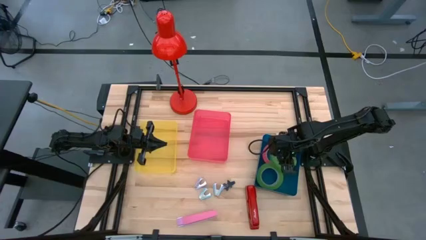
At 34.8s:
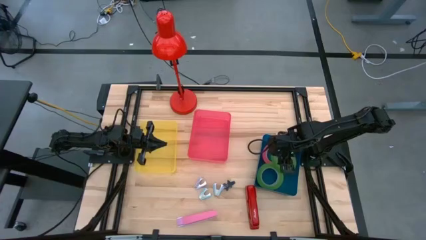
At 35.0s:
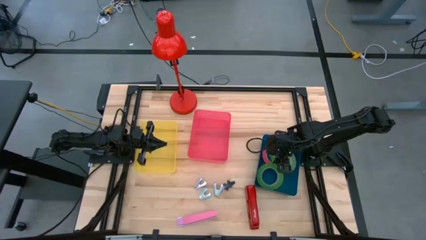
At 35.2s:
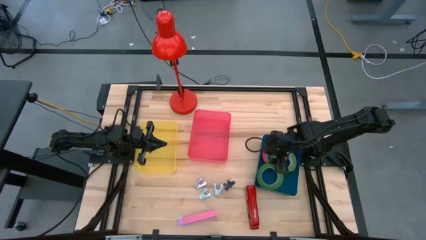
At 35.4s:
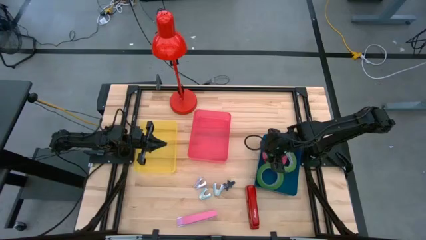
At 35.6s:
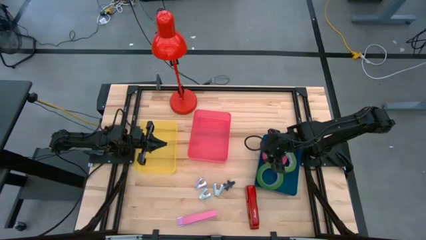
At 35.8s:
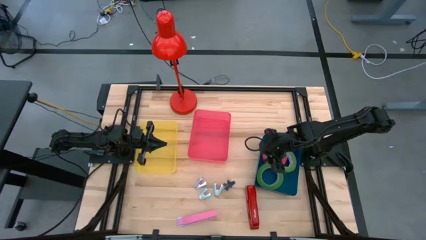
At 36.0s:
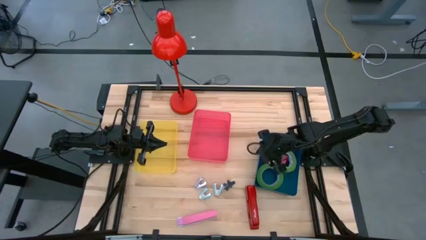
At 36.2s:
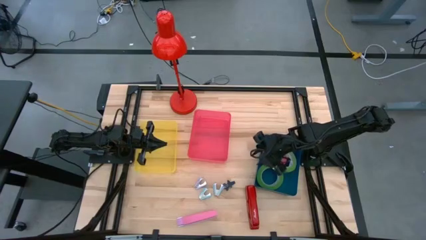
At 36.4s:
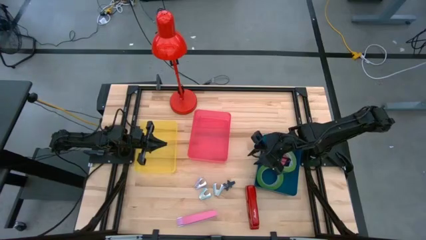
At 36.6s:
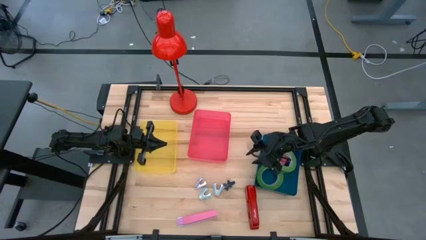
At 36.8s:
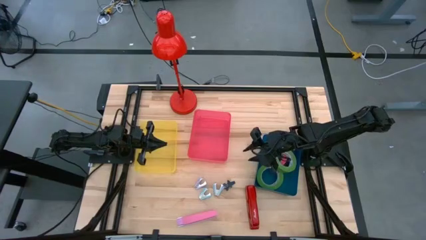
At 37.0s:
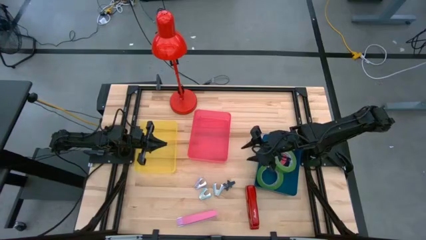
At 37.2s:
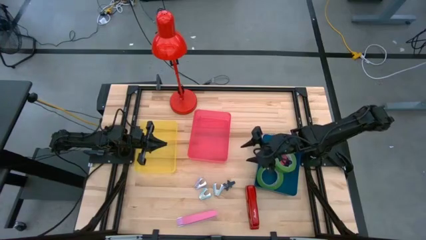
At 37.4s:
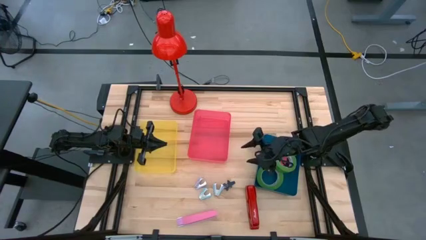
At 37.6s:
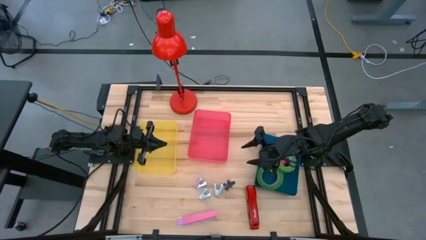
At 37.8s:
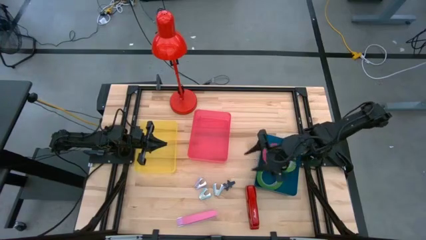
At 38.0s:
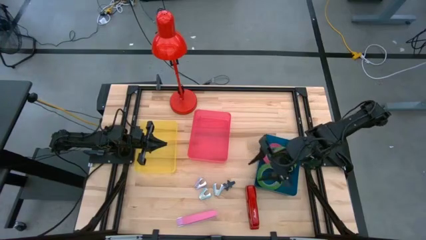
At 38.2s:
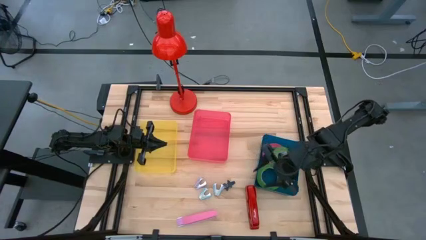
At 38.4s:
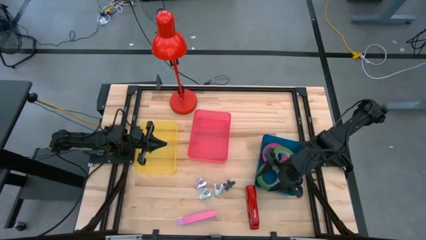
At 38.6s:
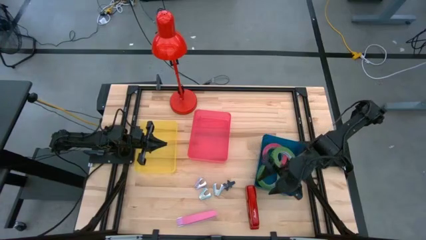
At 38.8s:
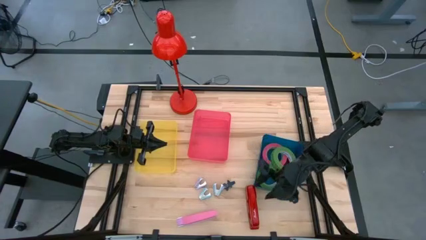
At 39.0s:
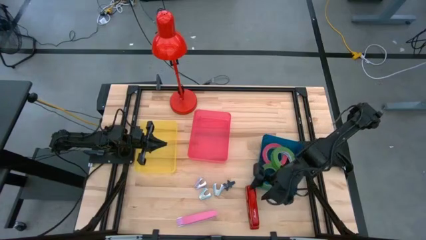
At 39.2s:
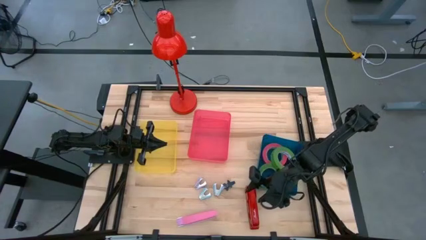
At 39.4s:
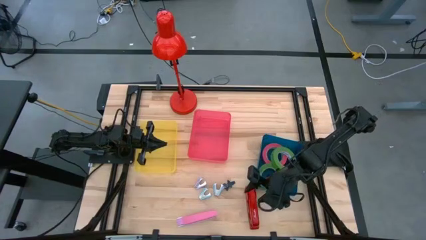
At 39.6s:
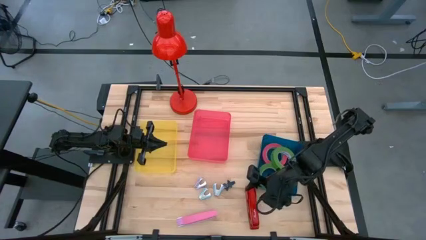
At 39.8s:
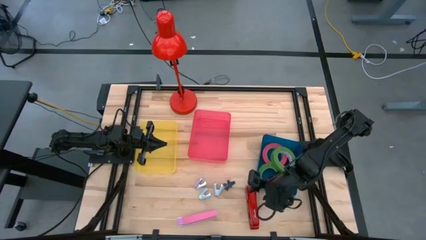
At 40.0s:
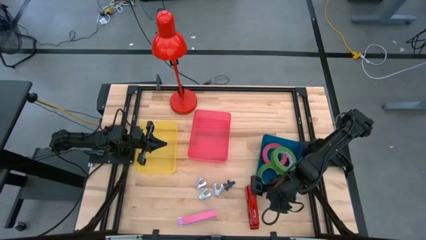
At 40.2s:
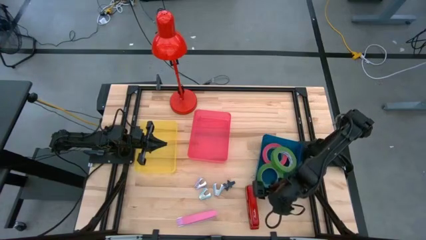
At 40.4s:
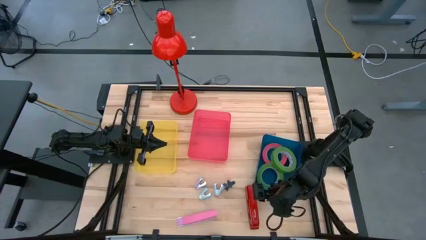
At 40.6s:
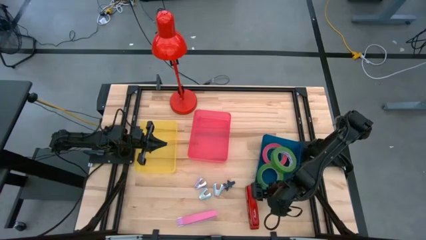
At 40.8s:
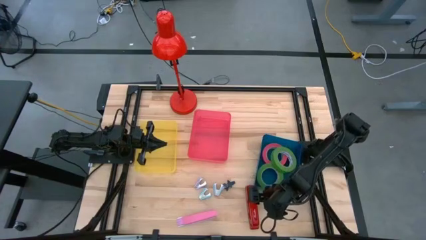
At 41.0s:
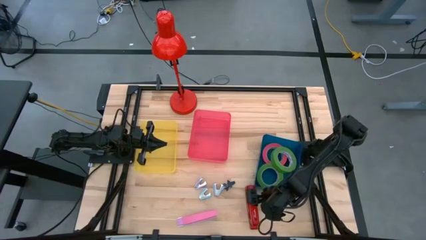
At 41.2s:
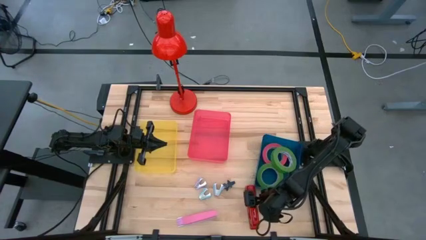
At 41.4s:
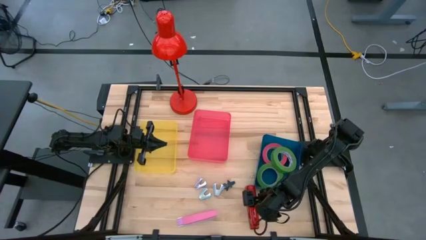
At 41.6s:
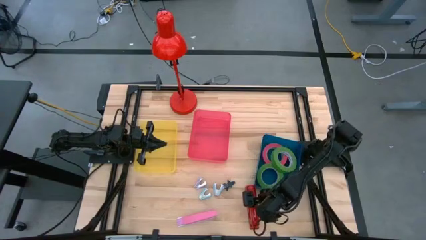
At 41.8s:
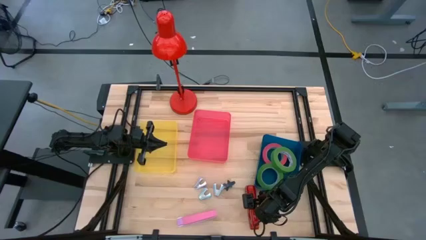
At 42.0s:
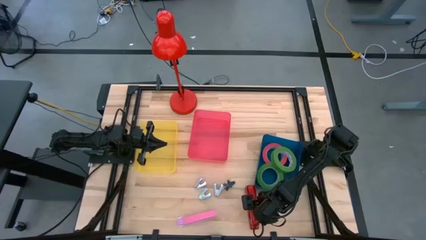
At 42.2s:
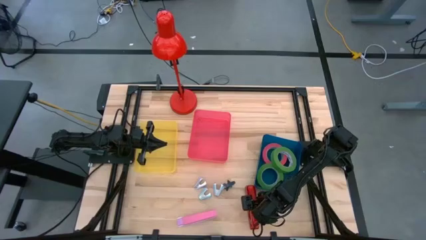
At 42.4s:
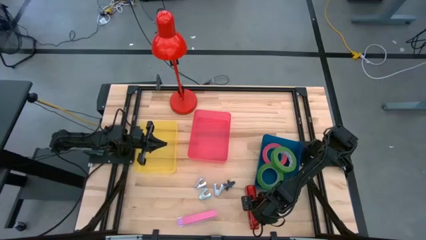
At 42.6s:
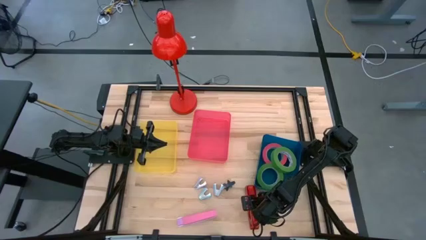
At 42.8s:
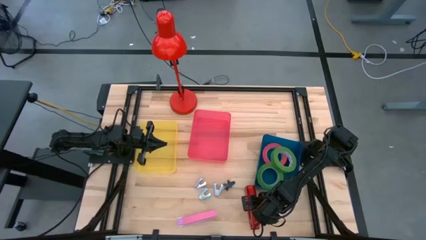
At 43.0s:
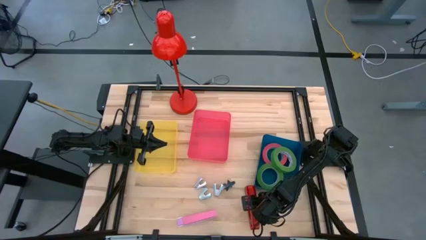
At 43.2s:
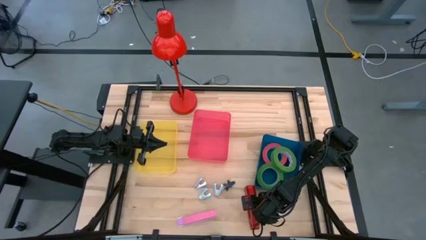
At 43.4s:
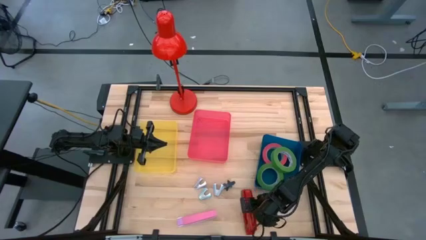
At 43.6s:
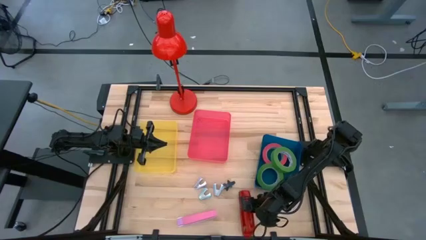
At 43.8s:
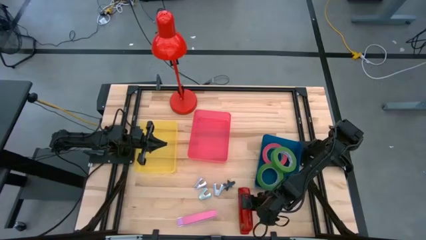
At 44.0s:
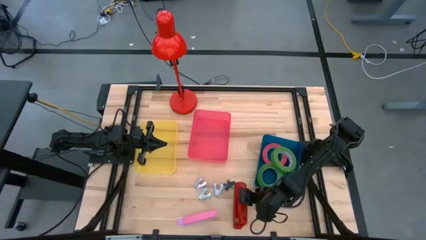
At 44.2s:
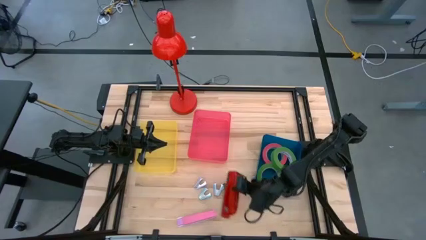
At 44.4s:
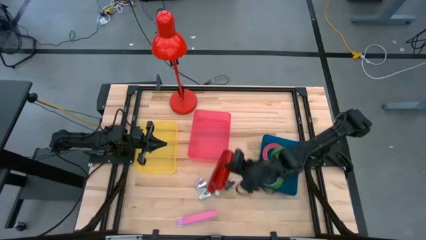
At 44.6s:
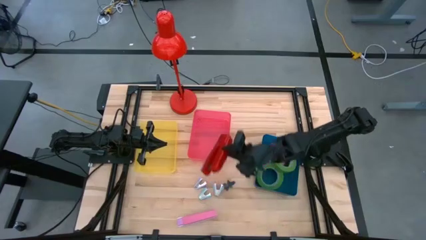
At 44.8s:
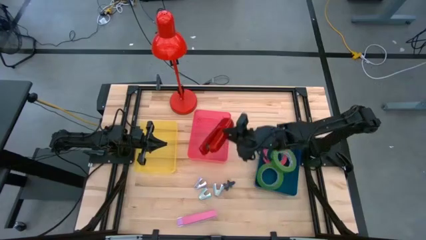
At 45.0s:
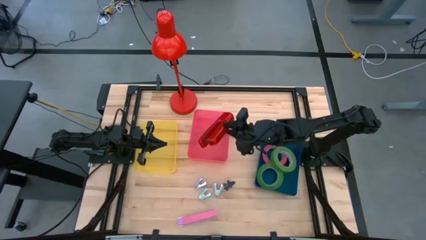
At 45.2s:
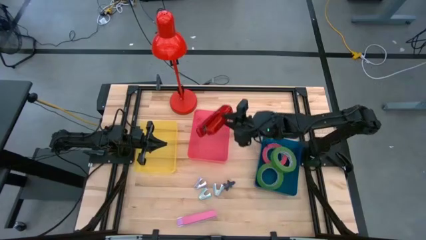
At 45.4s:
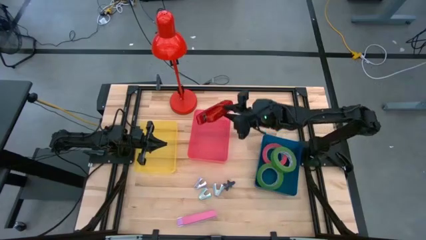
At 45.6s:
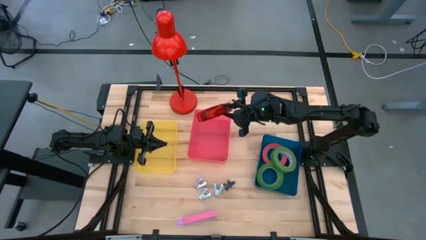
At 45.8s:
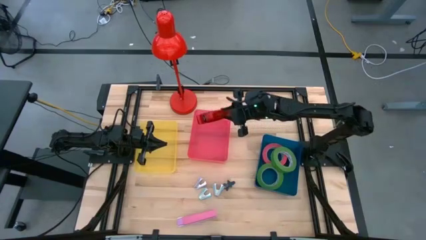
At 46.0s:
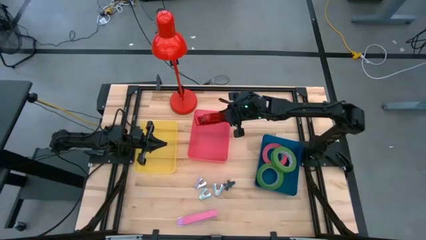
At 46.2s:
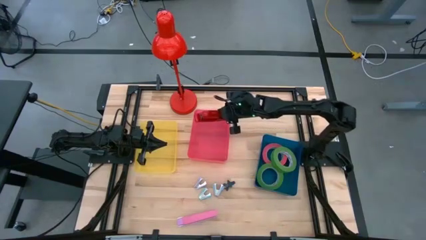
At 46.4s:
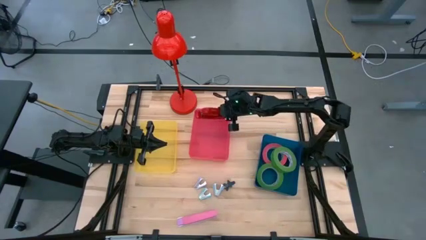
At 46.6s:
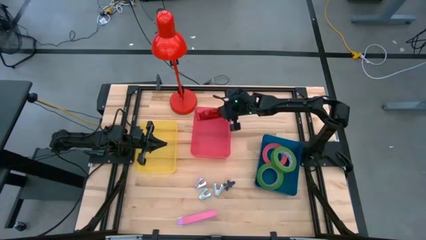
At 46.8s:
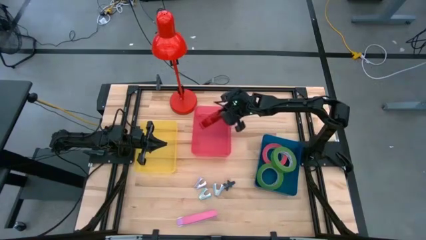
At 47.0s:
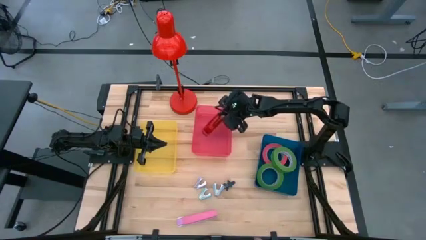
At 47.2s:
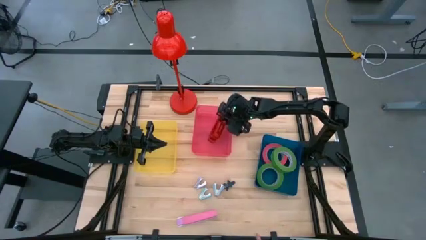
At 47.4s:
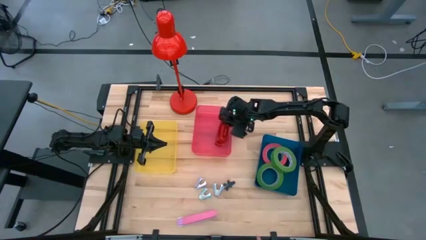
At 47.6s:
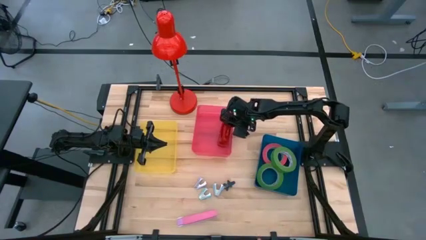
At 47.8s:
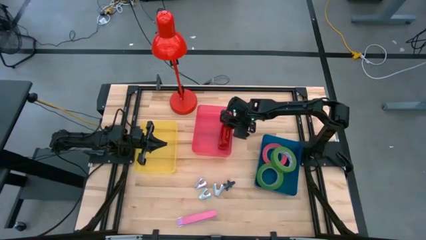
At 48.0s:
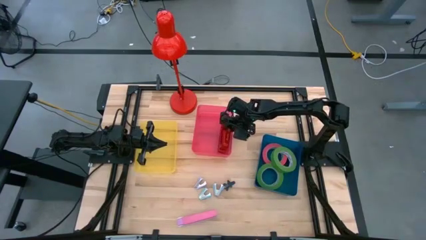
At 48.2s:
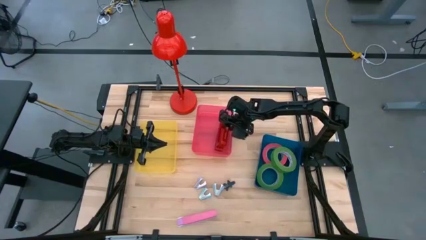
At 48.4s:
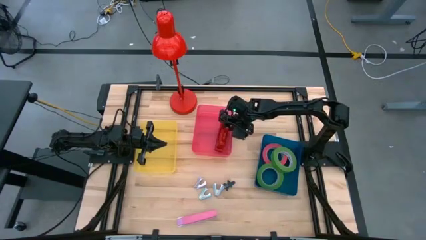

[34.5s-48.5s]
Task: Pick and place Stapler, Stapler remover, tape
Put the red stapler into the red bin

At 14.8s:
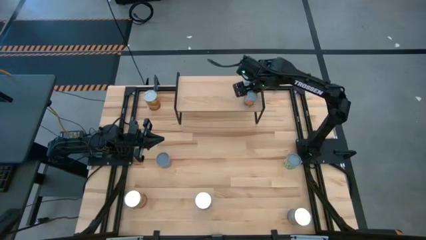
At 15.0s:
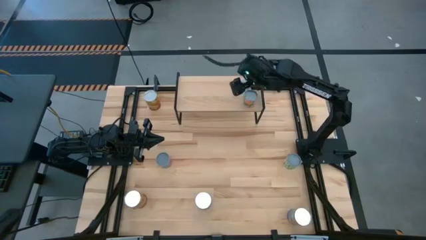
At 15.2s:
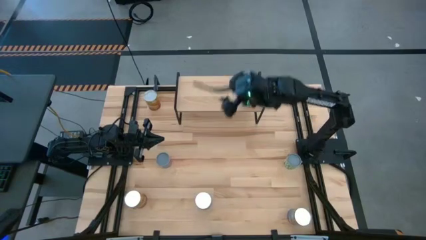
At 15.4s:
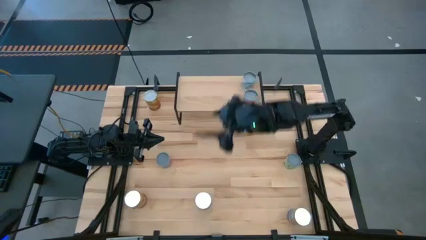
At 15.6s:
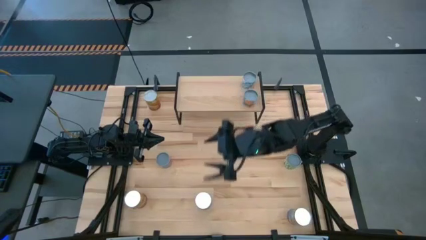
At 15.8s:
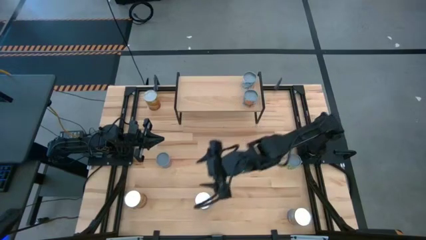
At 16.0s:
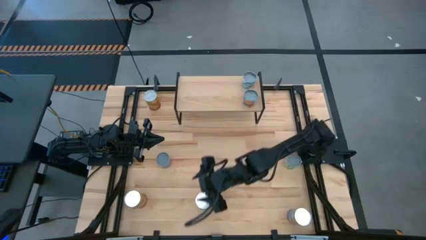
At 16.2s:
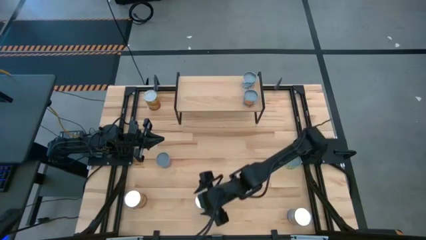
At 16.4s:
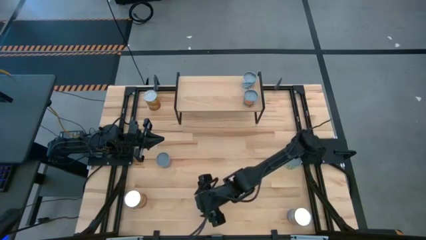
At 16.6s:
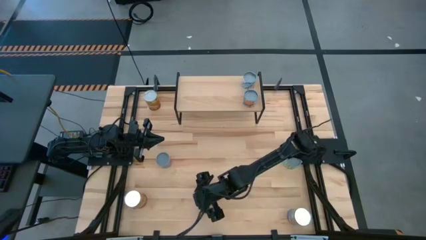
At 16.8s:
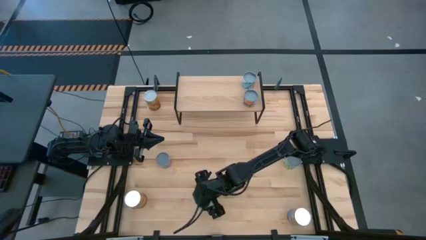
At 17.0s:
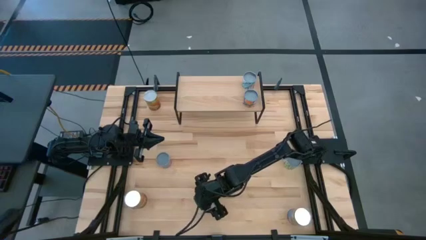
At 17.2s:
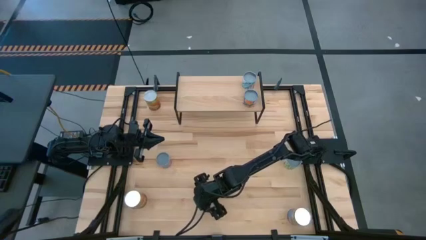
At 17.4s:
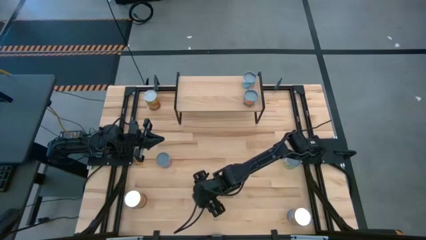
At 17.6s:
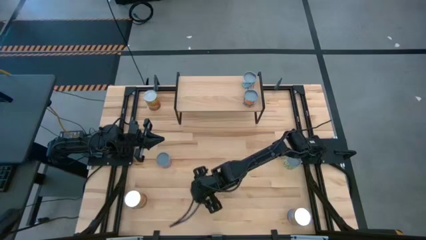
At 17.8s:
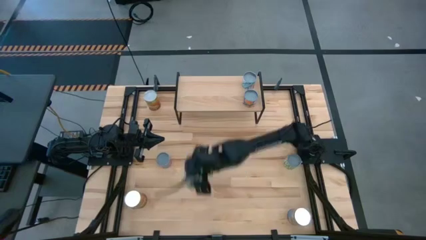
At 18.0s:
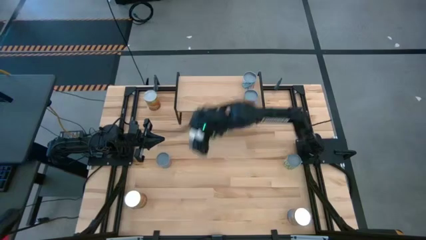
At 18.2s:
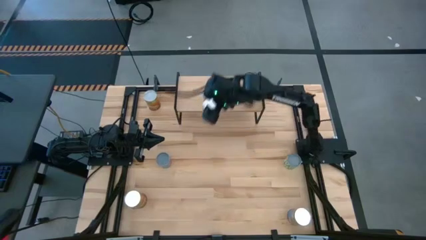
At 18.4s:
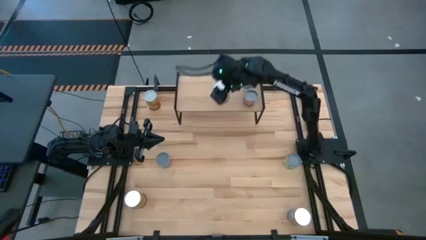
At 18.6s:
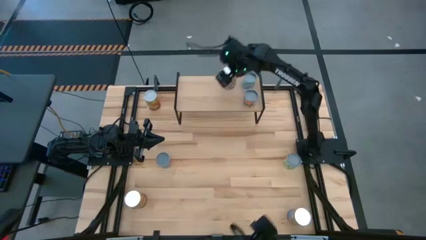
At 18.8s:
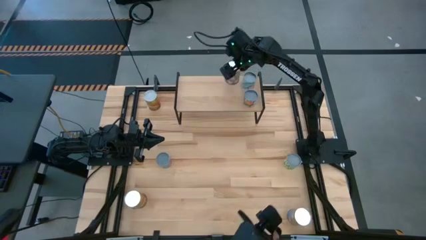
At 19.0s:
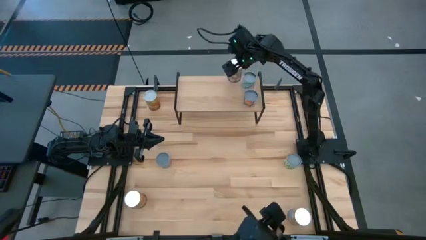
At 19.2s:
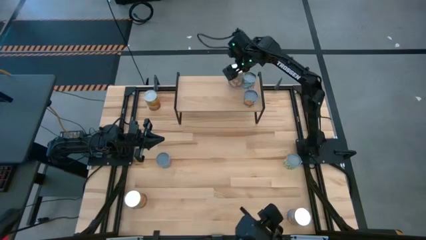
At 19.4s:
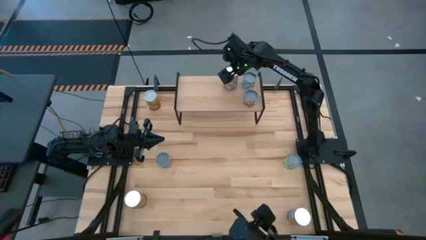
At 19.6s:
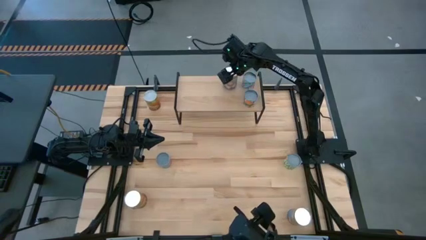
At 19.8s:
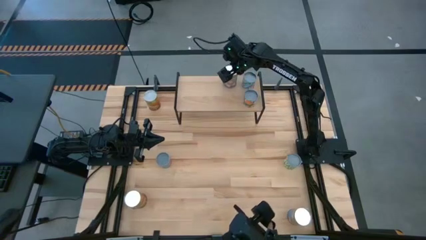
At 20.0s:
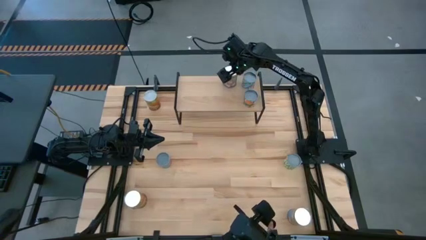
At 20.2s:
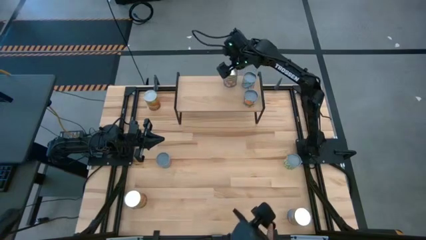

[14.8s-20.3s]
Task: Pick and place cans onto a shelf
Put the left canned peaches on the shelf
